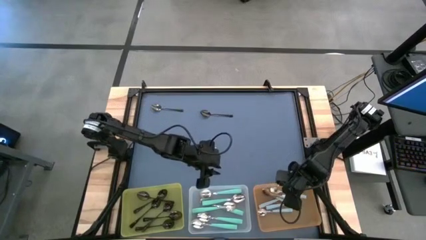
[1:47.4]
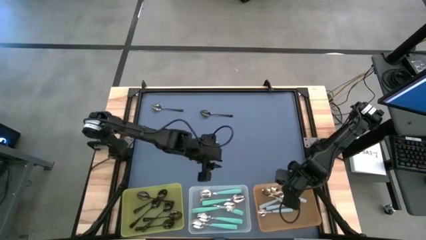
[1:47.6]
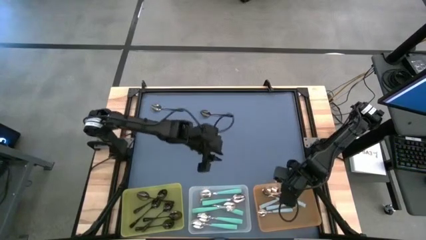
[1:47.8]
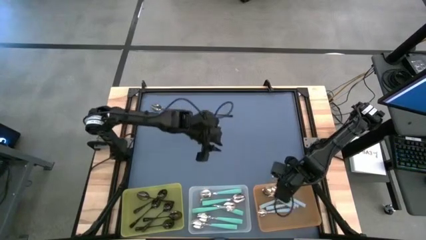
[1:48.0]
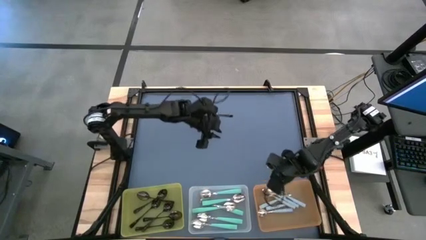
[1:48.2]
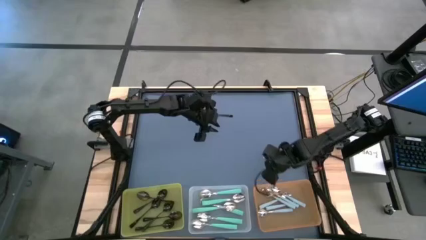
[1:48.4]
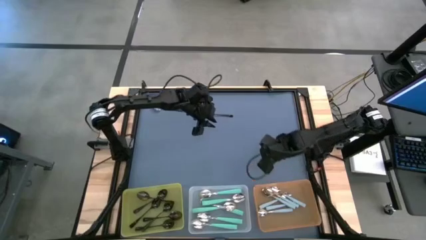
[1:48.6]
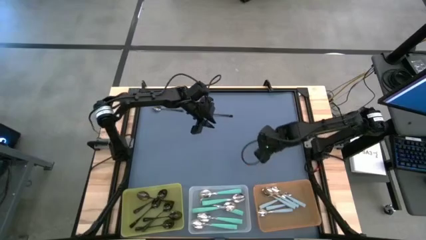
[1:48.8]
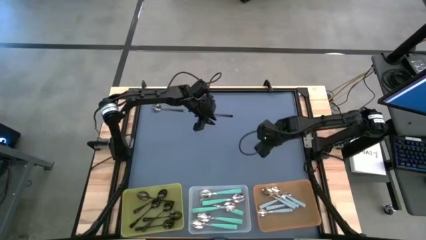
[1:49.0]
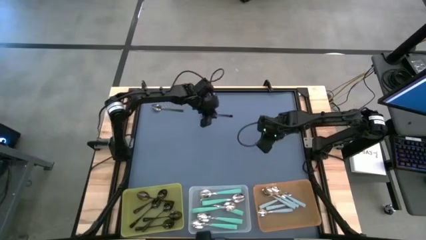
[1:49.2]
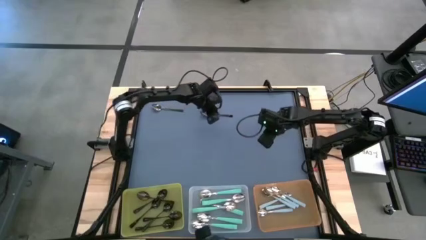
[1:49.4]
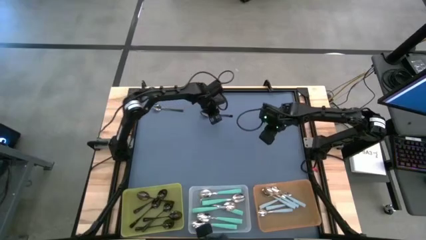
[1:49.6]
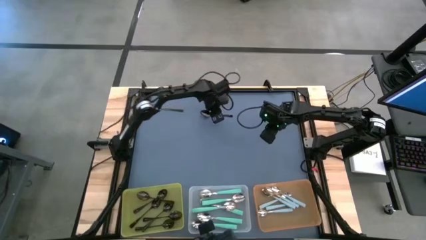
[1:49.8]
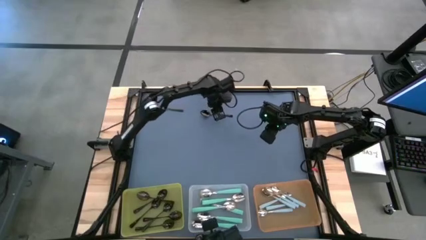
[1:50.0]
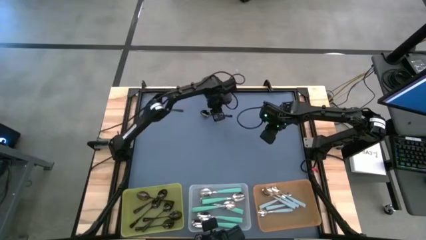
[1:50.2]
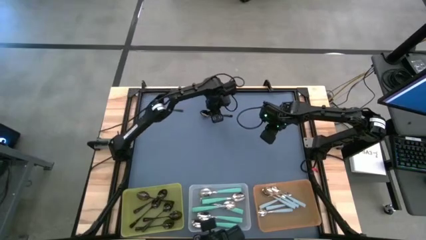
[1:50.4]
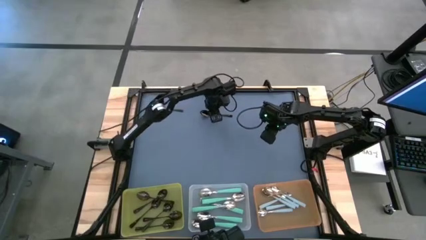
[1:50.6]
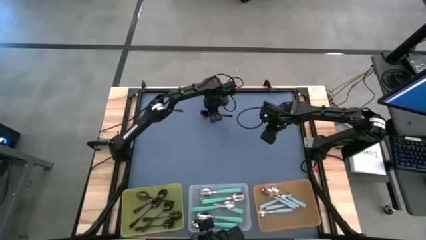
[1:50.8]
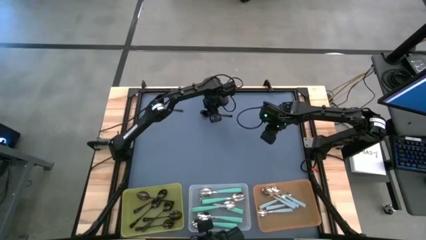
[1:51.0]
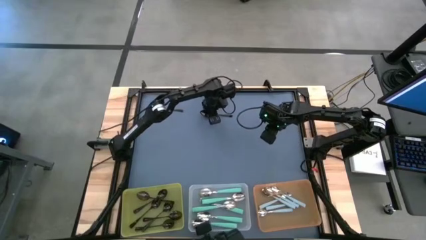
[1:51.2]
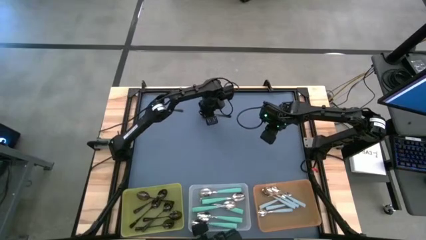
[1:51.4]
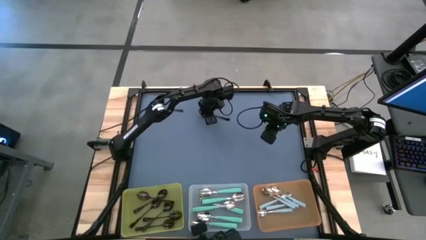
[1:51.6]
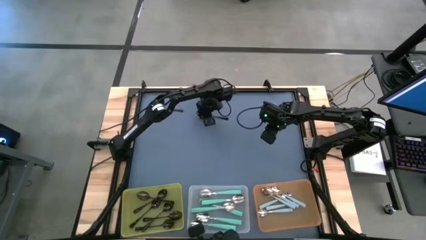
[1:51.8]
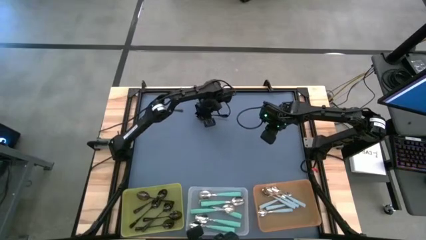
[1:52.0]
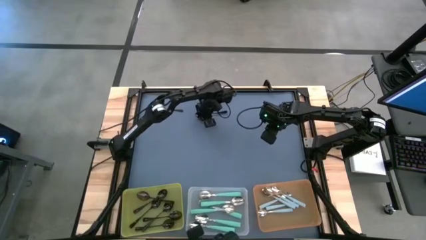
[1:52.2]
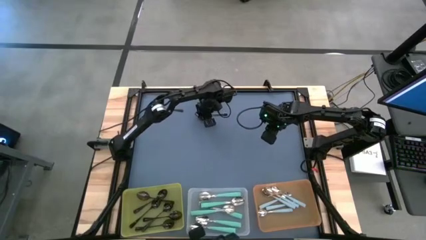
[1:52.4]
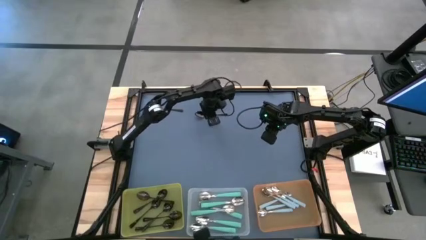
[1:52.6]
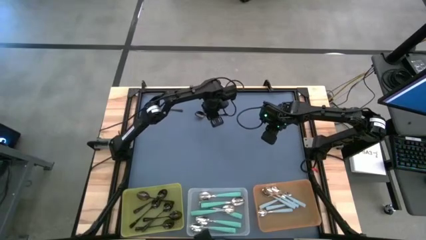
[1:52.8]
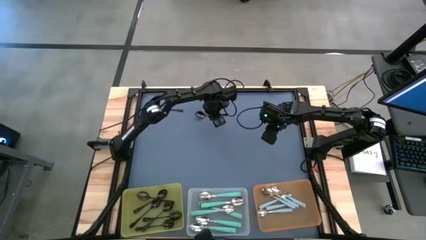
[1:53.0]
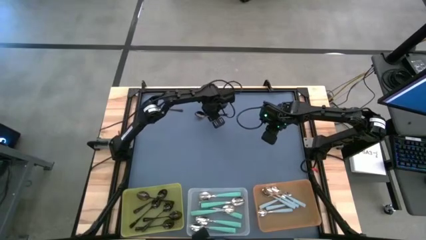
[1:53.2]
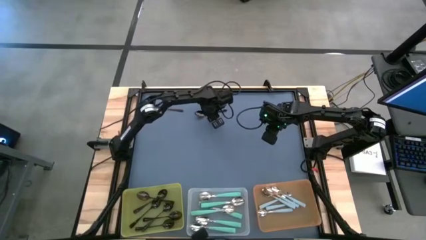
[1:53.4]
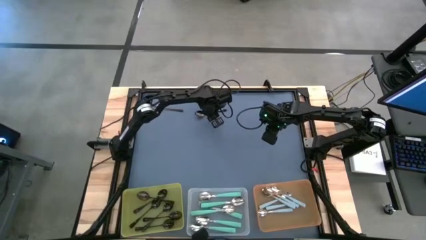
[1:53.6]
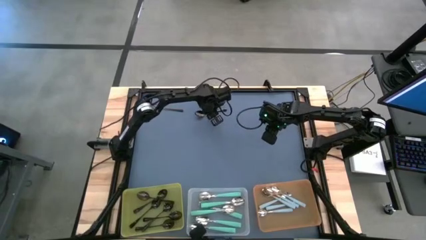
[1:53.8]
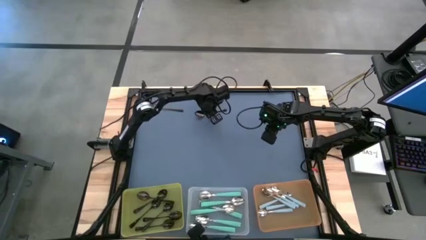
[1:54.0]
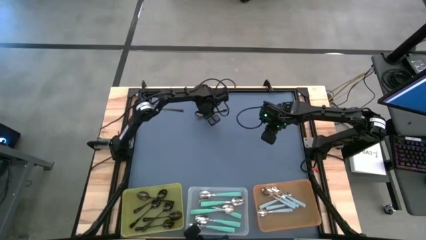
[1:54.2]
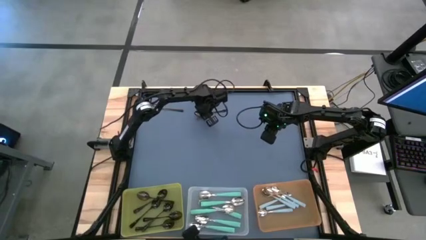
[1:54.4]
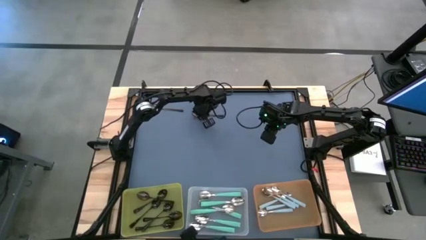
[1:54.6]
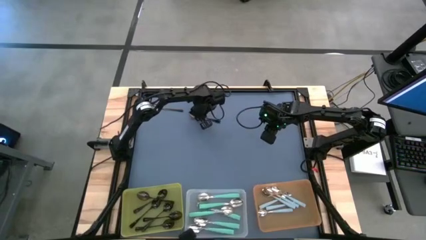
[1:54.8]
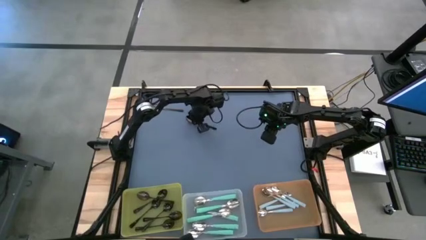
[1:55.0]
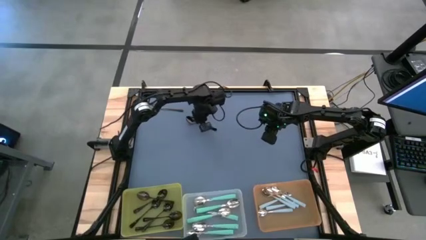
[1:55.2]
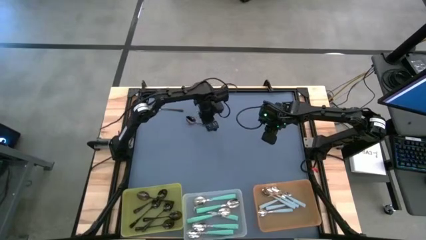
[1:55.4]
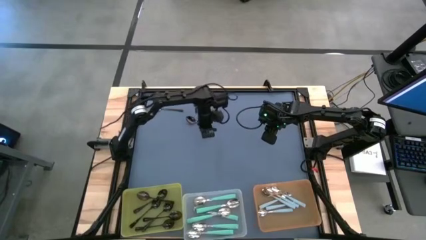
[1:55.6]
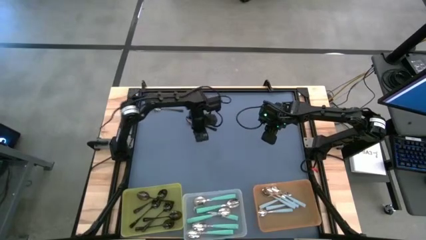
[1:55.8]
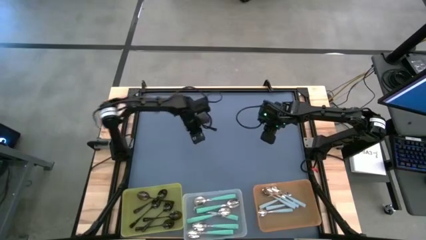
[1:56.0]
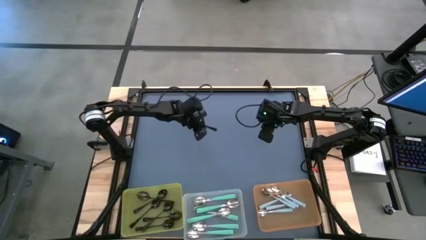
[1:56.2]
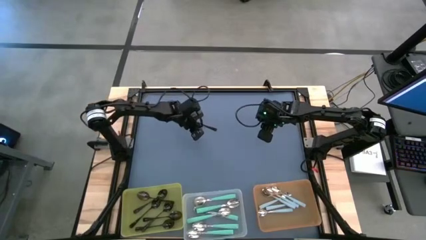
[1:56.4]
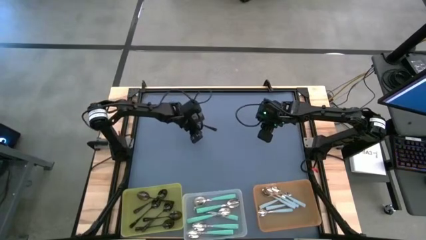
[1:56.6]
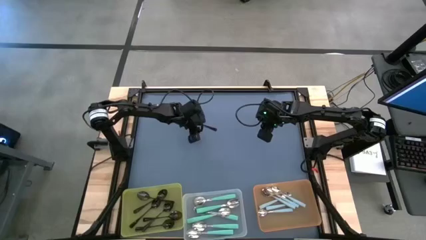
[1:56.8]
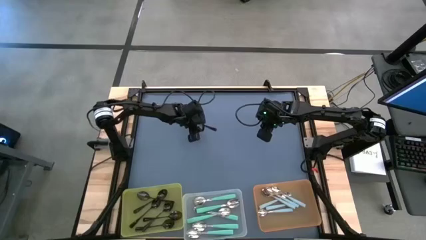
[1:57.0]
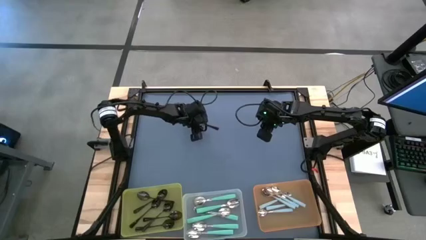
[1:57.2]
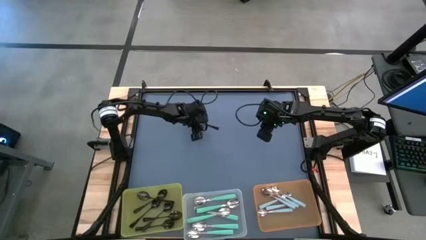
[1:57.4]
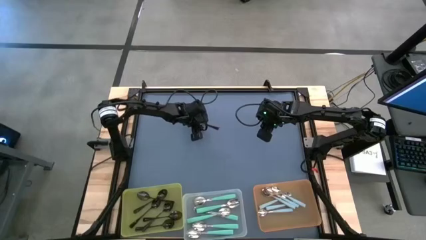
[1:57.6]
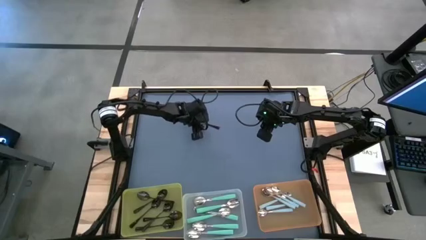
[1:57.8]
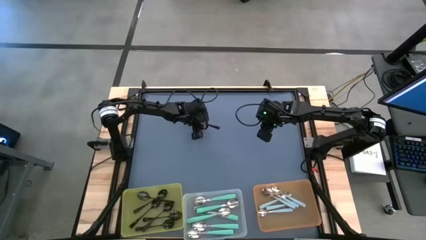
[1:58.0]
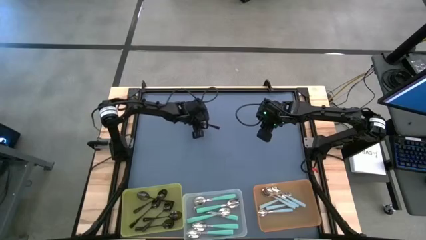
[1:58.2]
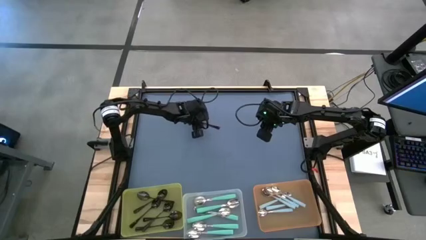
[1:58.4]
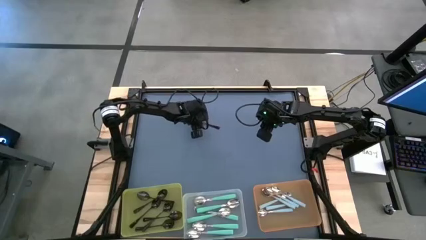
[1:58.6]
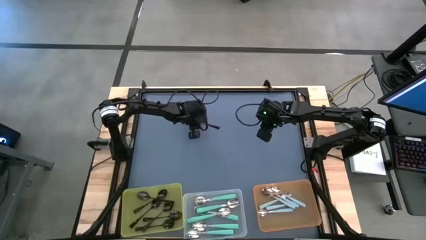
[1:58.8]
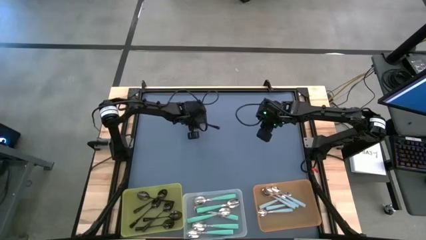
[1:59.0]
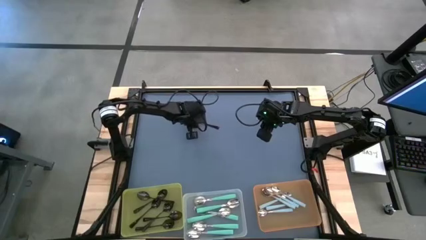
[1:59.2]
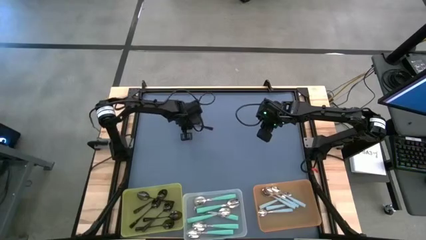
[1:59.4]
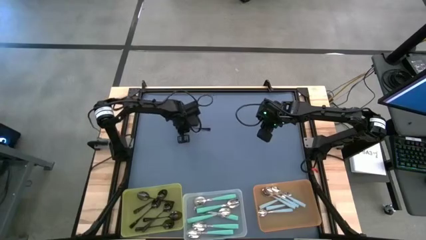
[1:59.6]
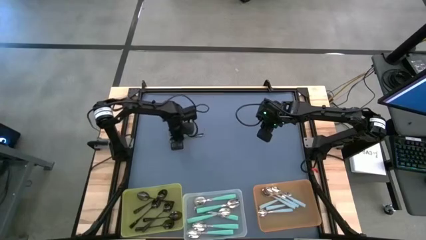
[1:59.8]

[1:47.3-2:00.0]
Task: Sort silverware by color (type)
Put the black spoon into the yellow bin

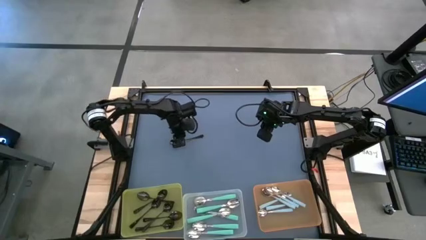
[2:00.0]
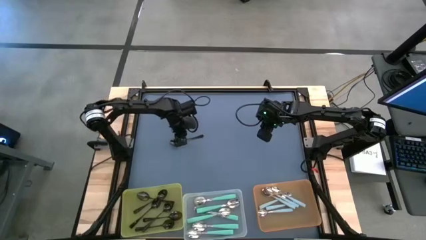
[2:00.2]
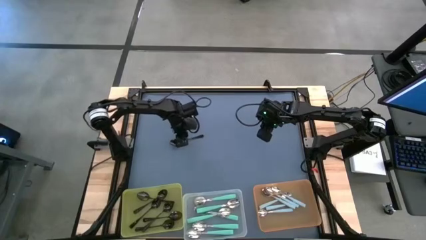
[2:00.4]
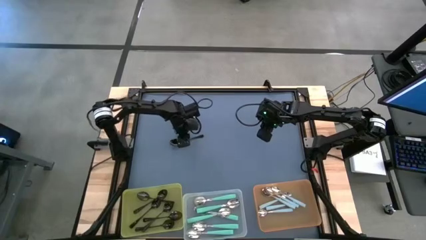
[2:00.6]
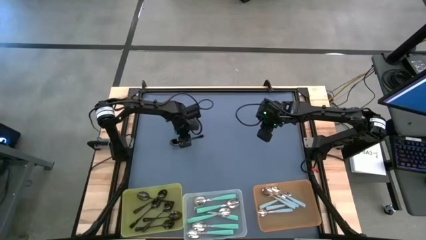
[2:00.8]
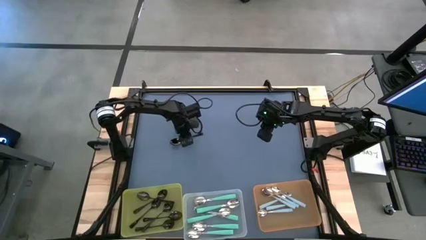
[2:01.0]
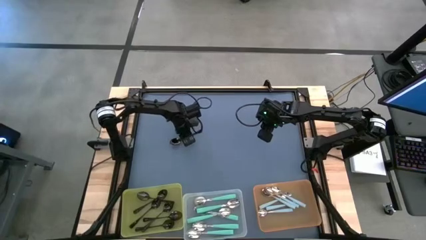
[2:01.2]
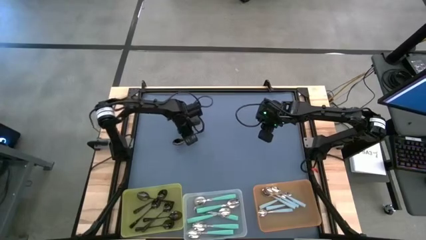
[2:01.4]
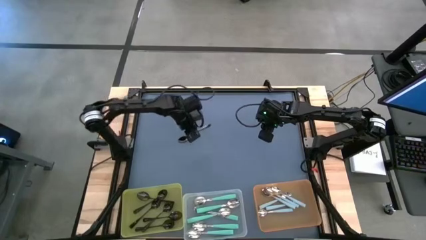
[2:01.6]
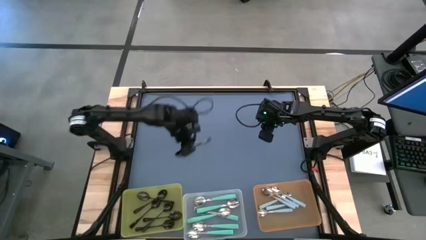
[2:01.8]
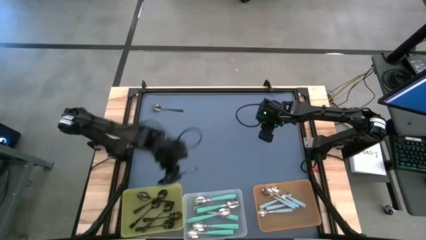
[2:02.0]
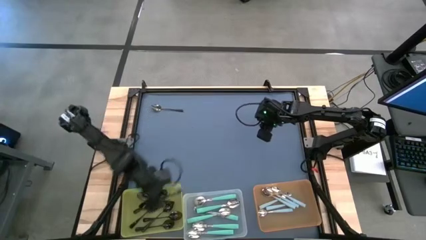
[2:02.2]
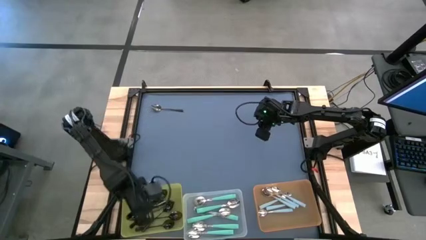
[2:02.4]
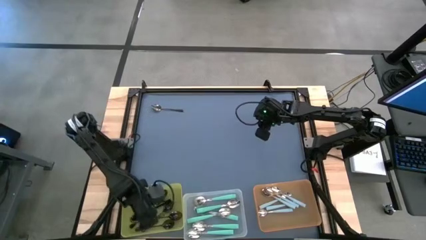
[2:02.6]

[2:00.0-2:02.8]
Put the black spoon into the yellow bin

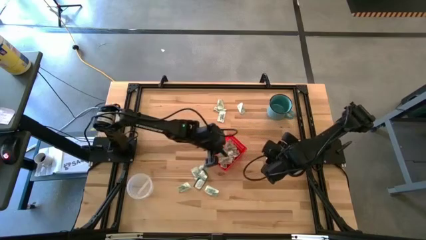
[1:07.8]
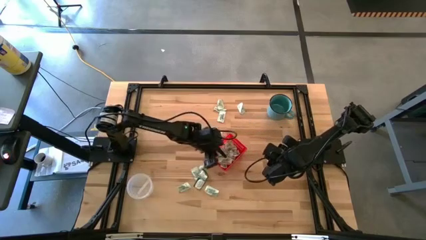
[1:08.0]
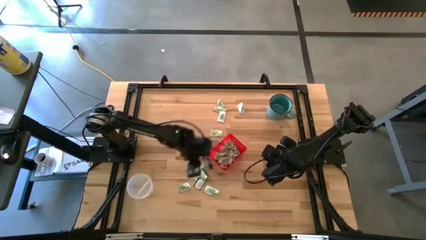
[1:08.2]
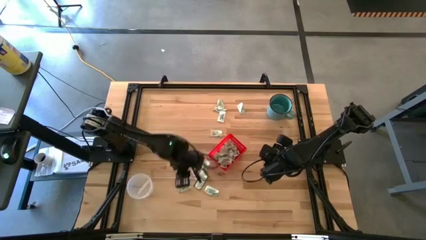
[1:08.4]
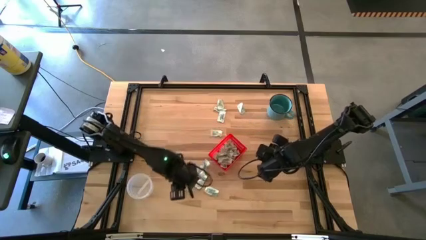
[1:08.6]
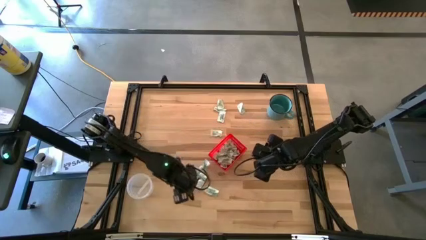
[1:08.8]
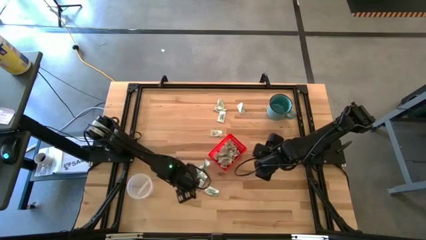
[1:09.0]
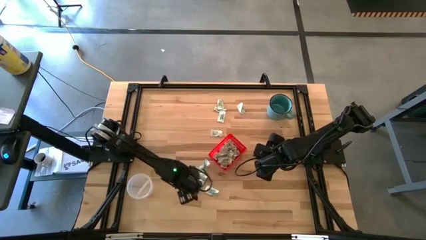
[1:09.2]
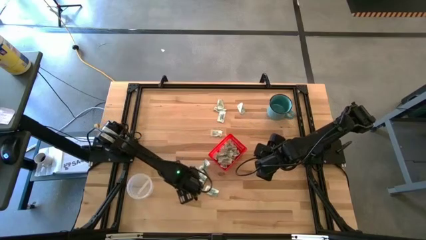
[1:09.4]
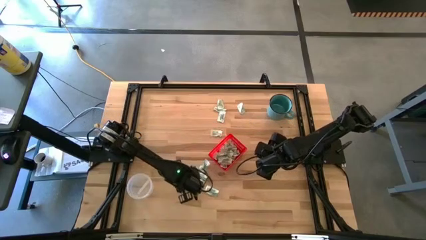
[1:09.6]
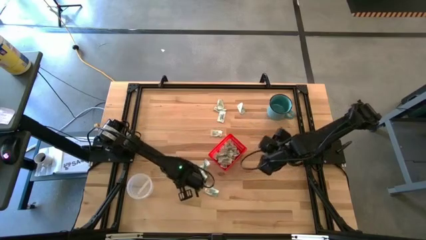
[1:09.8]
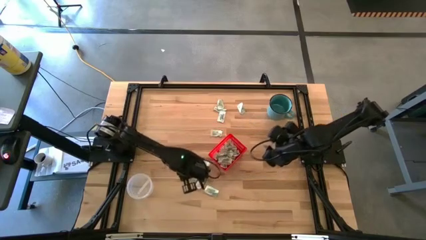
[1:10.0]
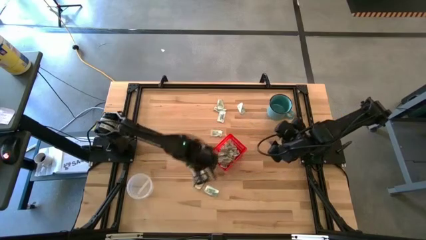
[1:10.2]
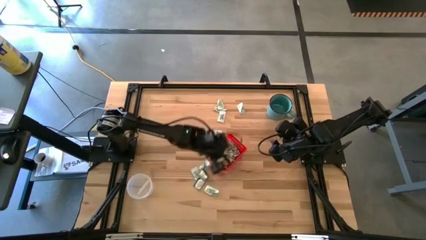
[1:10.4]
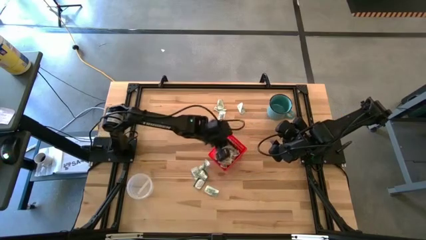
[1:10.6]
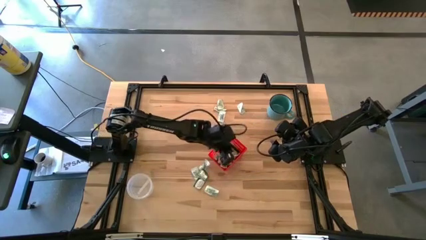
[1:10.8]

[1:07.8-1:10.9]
Task: Pick and place items into bin
Put the white stevia pack into the red bin
